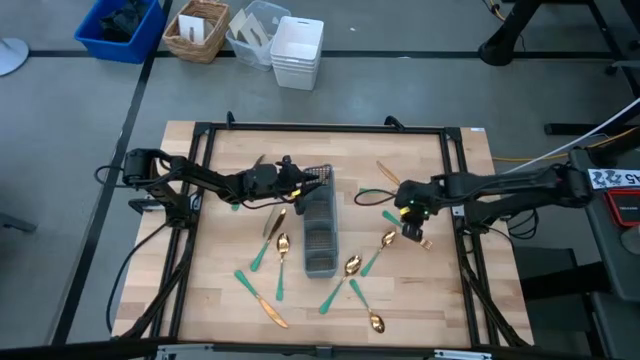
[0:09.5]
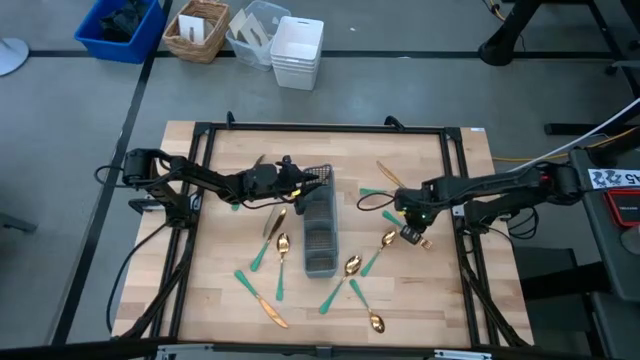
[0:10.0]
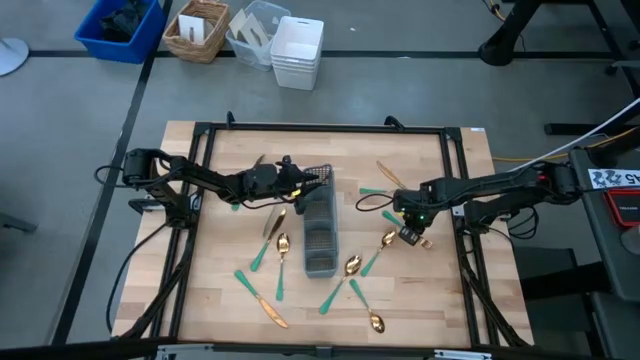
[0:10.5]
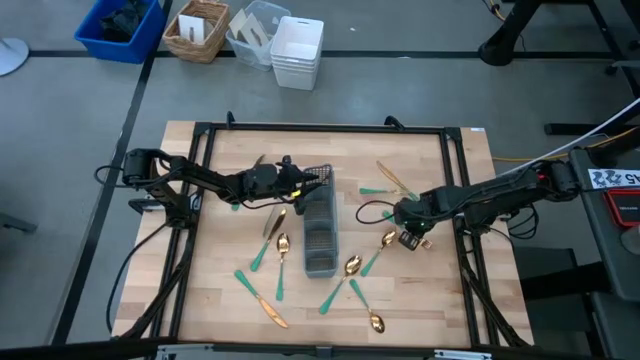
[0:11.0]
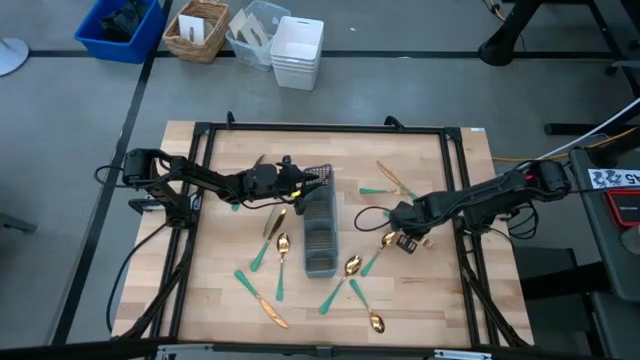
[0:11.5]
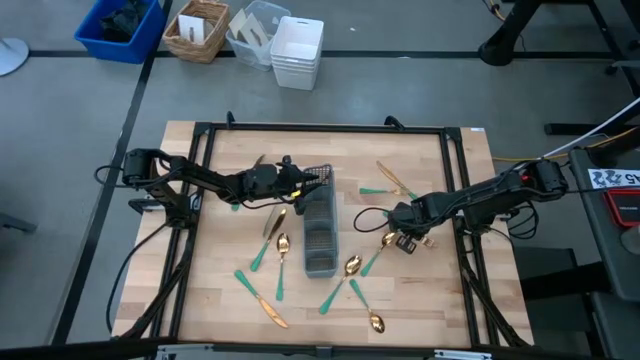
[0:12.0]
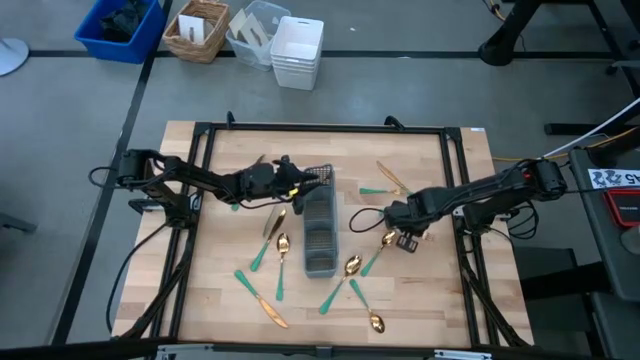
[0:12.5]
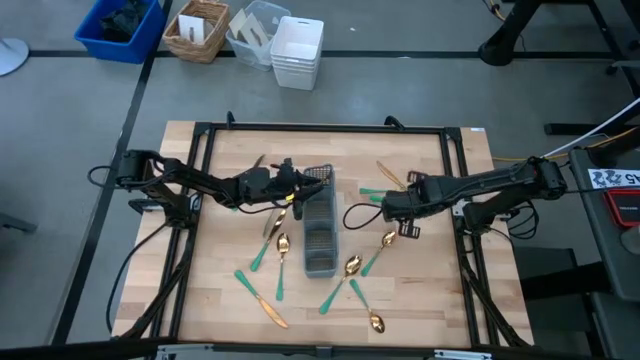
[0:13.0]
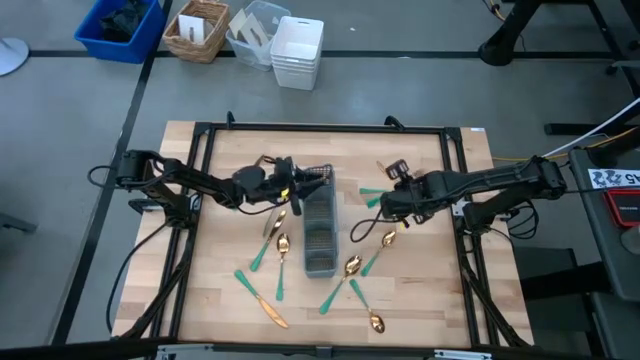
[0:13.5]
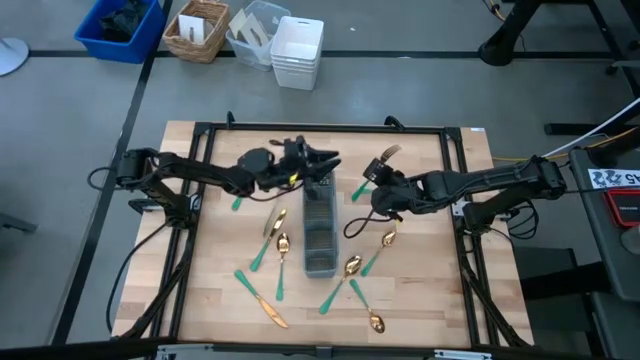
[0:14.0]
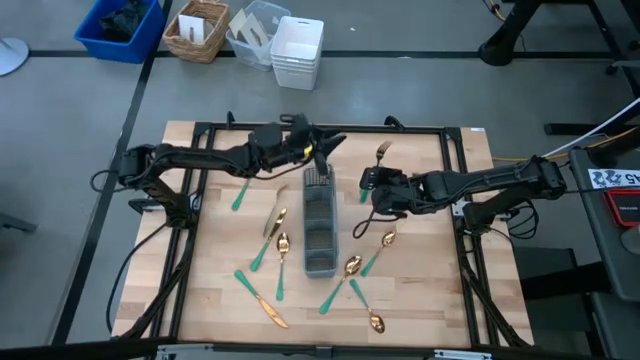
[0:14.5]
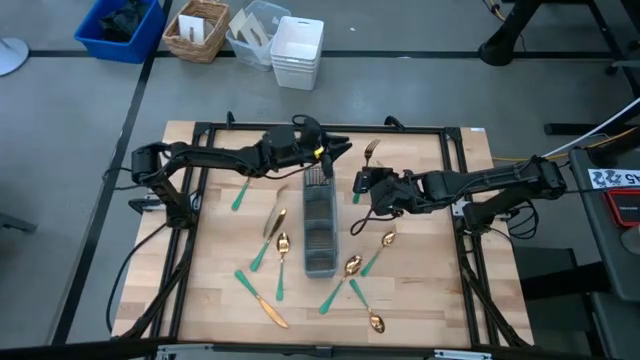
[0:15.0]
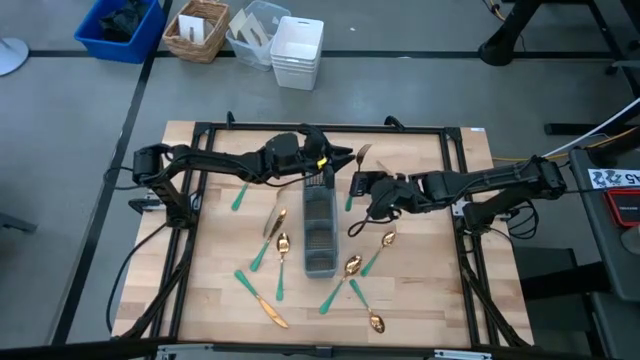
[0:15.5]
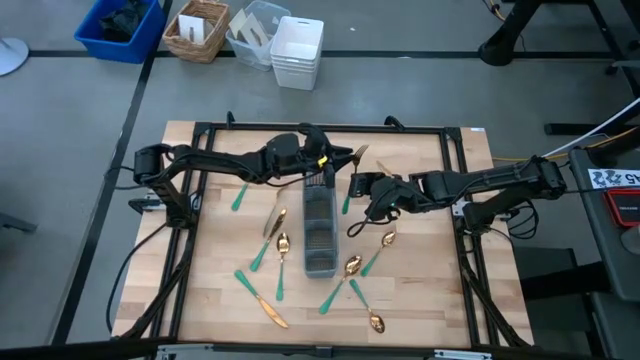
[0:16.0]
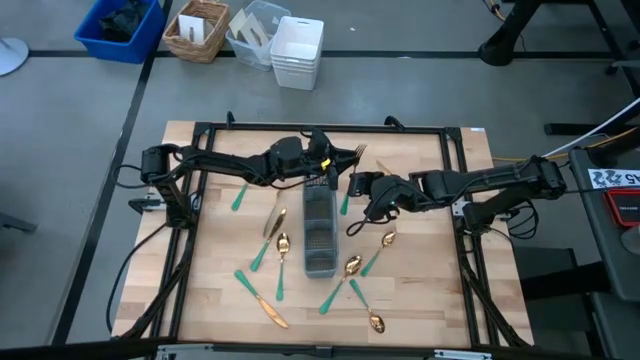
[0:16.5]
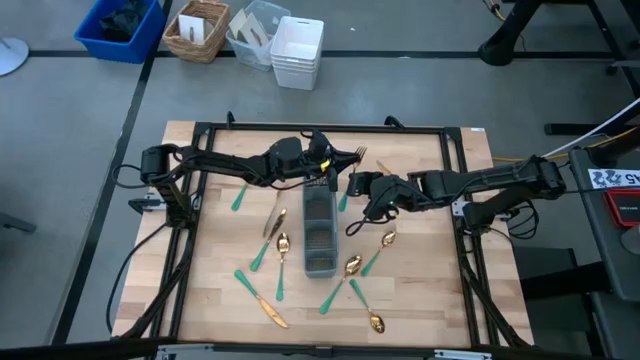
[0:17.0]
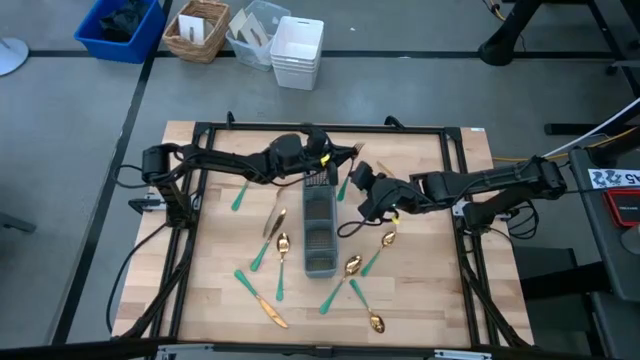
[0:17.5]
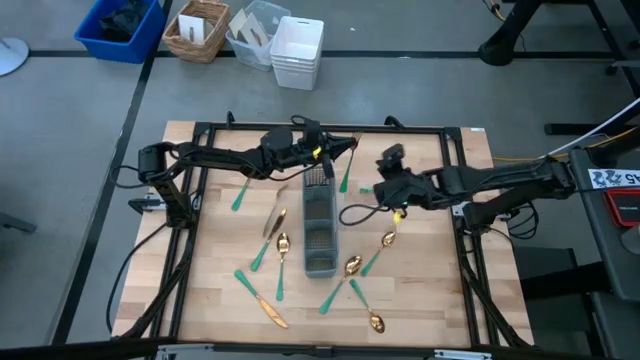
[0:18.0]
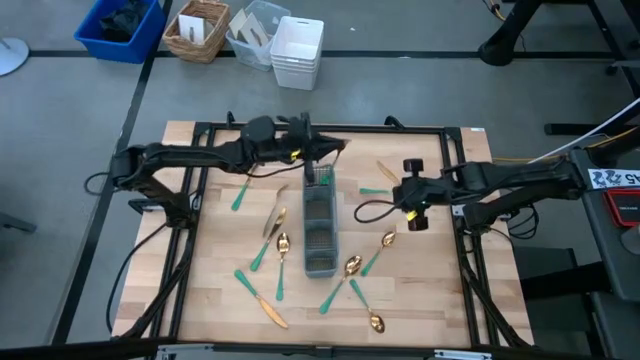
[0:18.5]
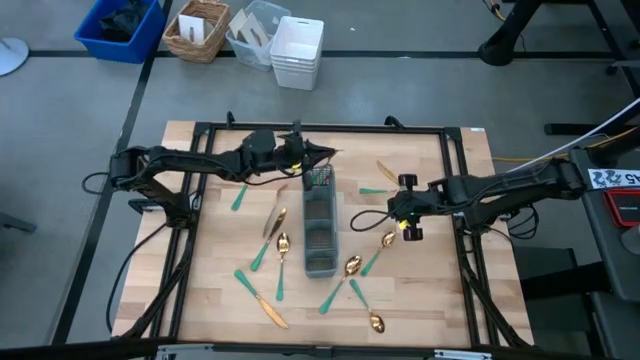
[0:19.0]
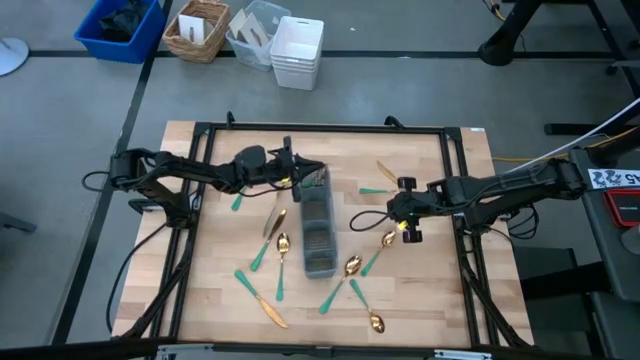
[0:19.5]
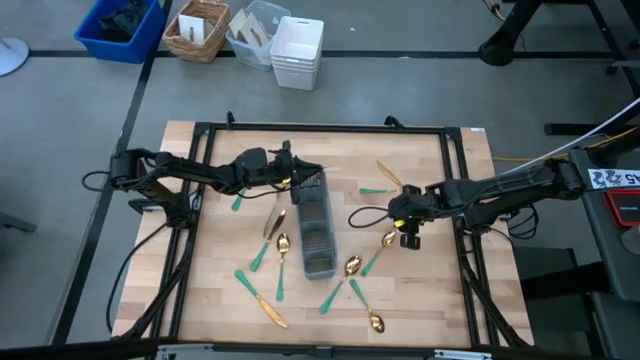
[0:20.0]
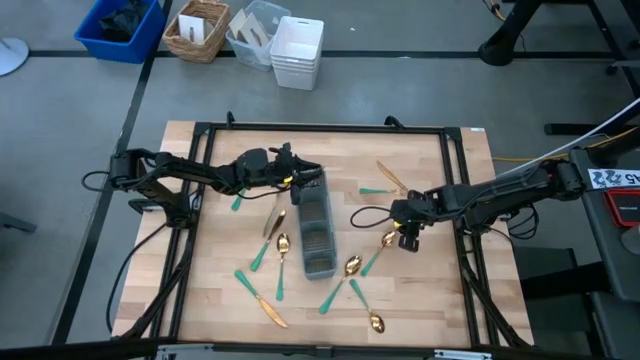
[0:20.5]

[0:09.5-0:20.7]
Task: Sort silverware
Put the green fork into the utensil rack

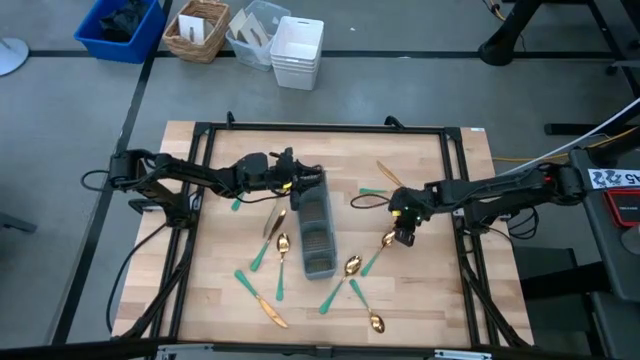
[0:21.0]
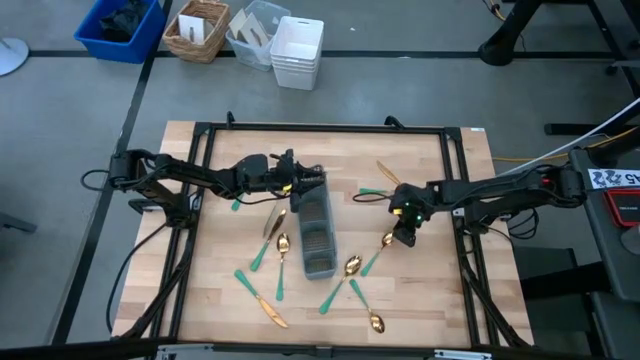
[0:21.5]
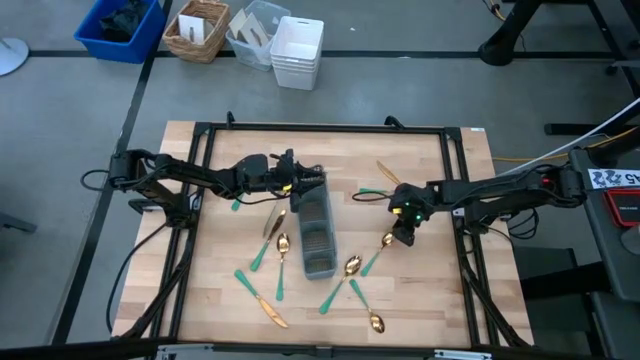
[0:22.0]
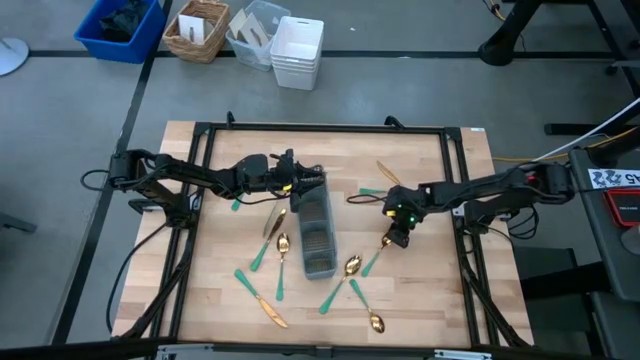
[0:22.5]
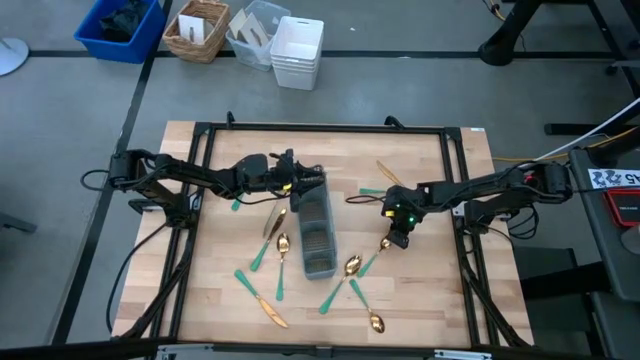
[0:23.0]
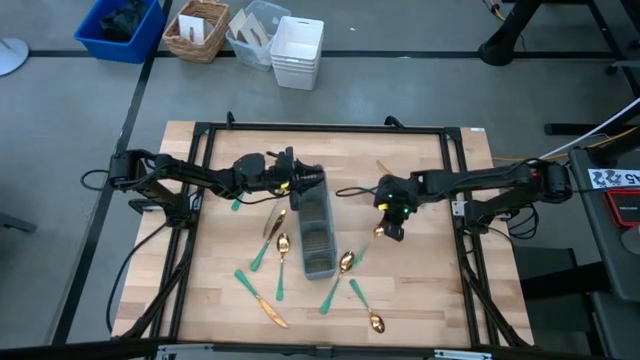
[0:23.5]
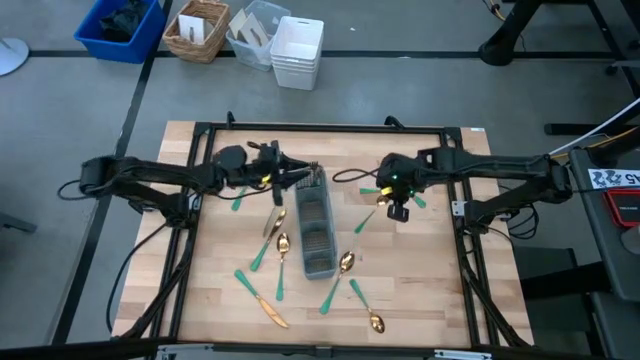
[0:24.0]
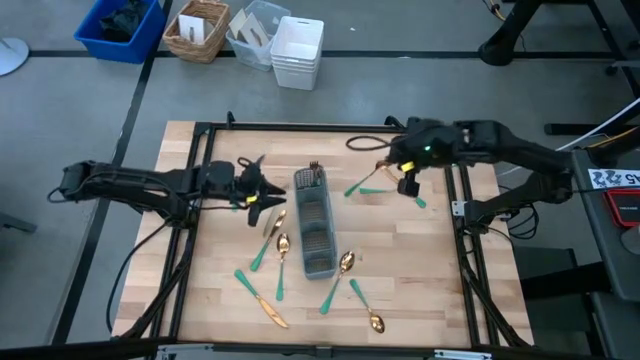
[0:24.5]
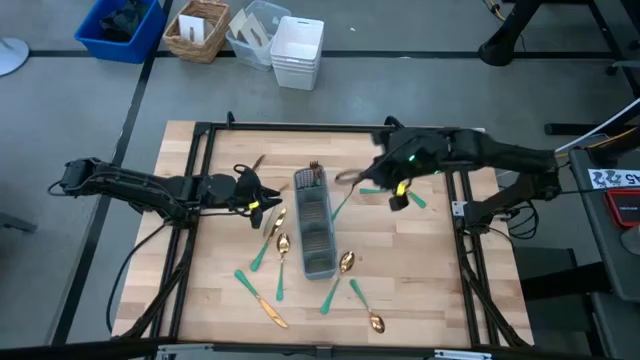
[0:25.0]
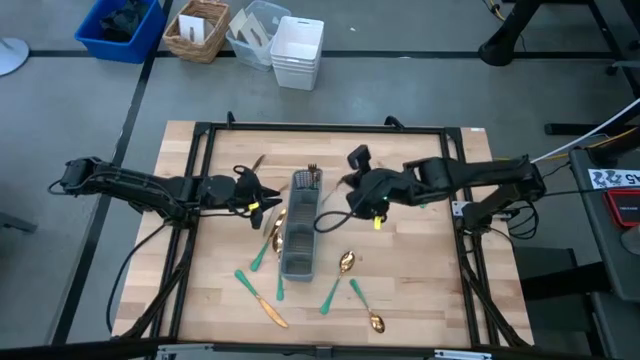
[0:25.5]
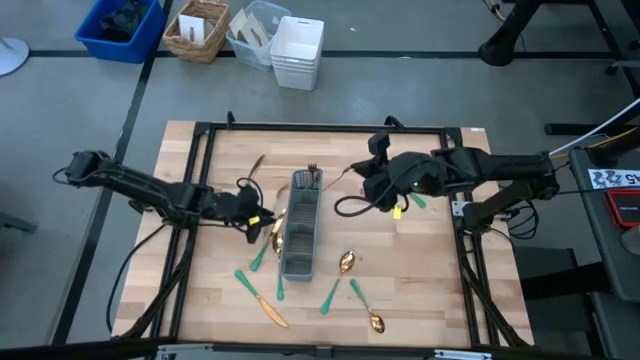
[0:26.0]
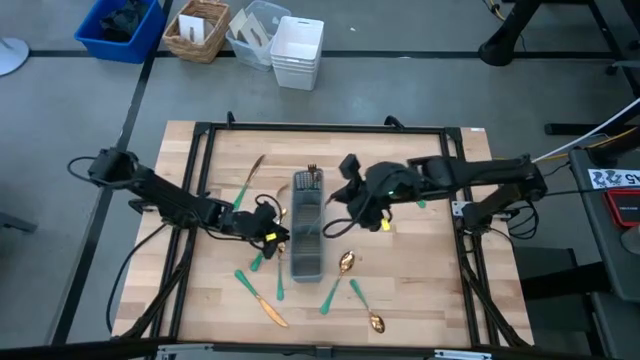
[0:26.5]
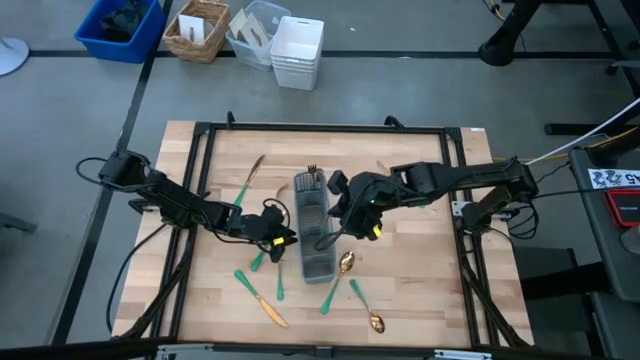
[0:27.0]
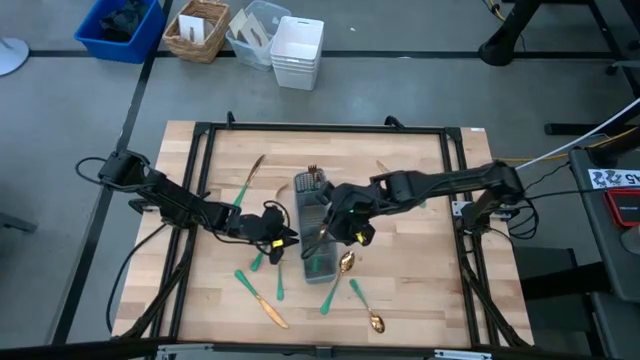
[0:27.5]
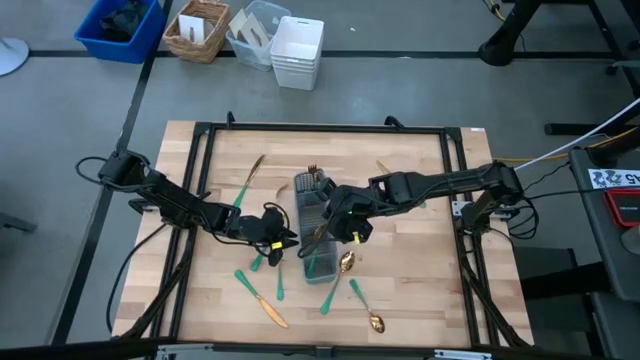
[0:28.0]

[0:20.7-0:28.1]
Put the green spoon into the utensil rack

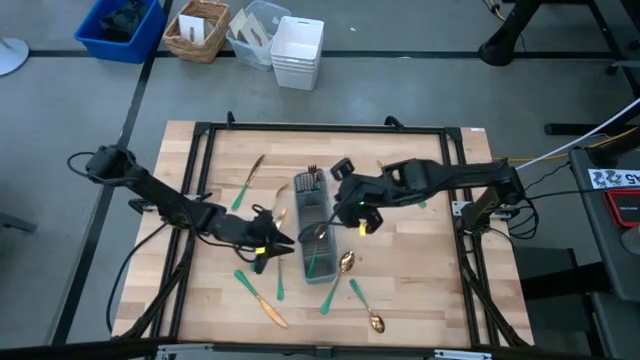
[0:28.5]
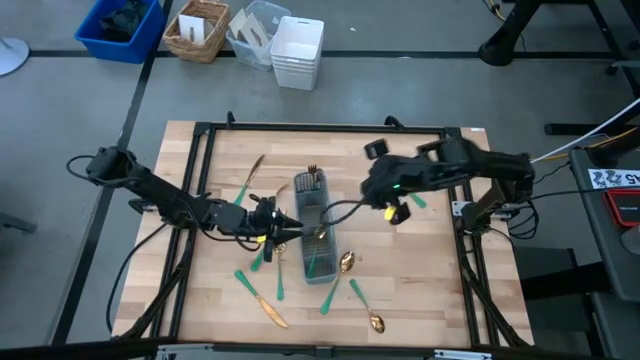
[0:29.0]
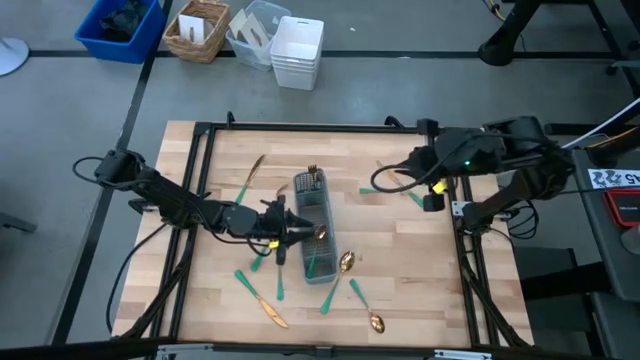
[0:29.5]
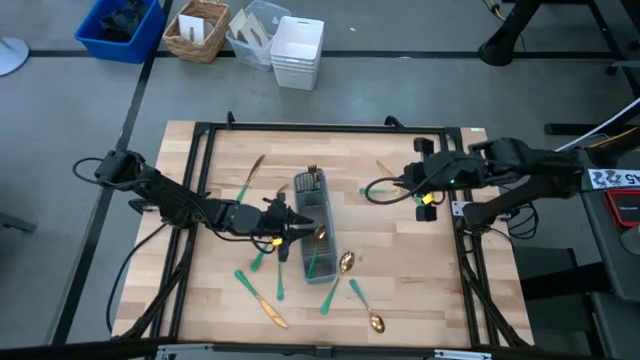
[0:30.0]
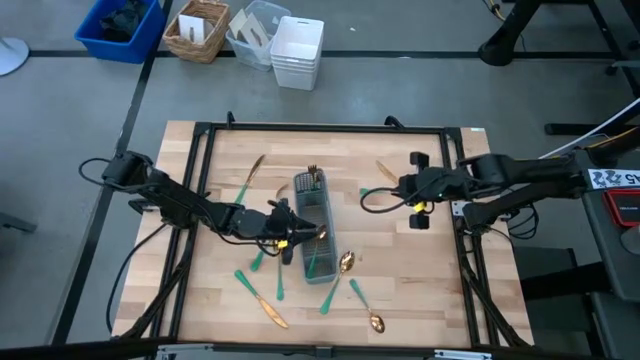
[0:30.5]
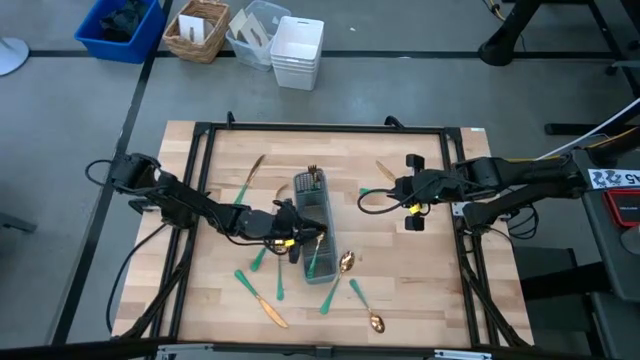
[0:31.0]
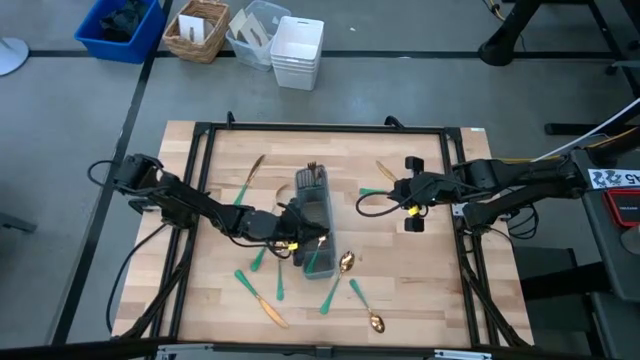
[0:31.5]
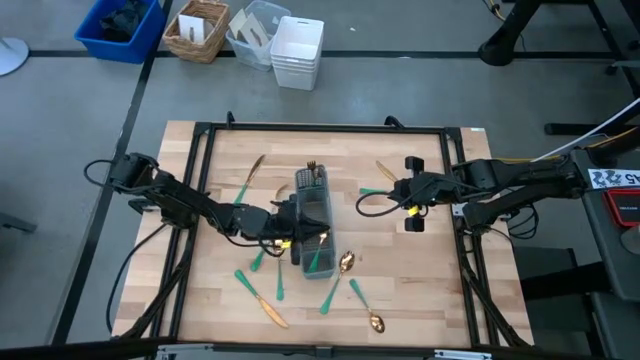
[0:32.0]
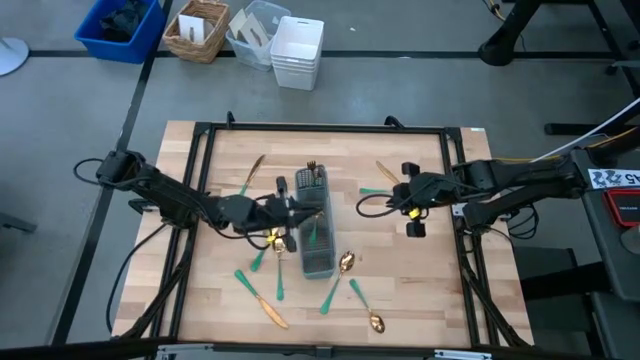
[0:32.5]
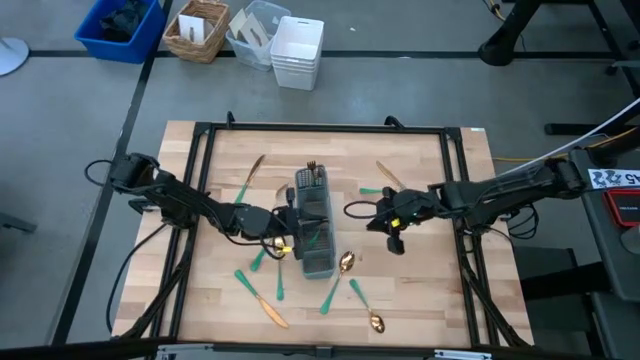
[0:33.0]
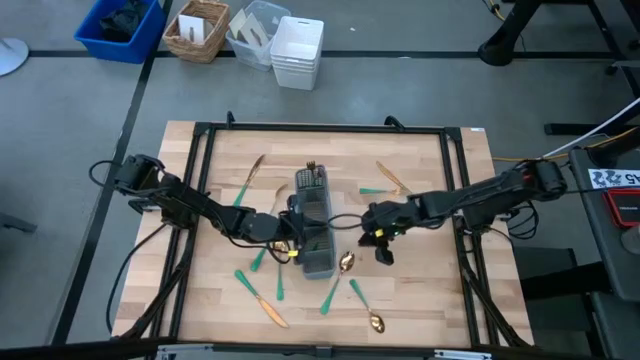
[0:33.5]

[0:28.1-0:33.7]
Put the green spoon into the utensil rack
